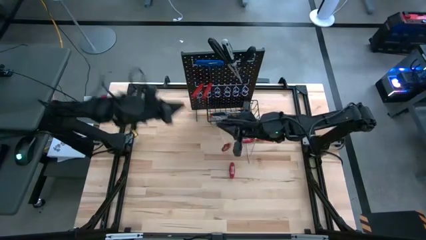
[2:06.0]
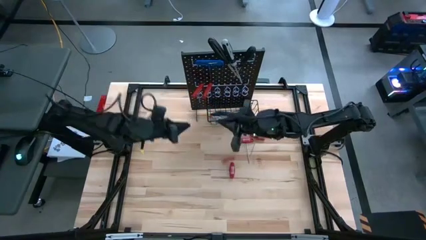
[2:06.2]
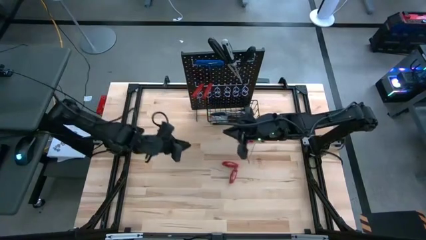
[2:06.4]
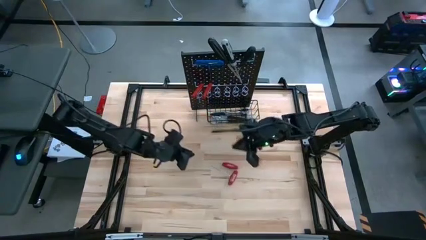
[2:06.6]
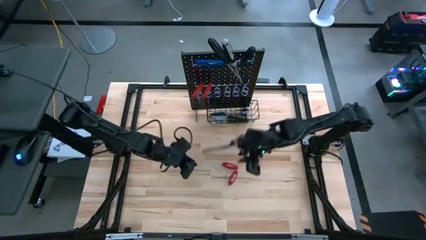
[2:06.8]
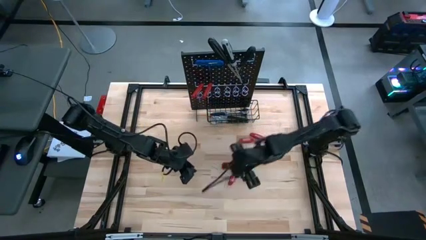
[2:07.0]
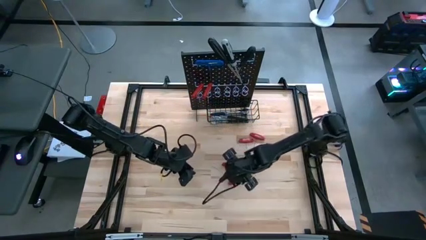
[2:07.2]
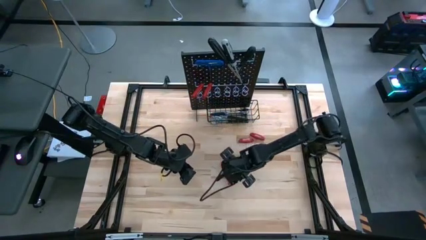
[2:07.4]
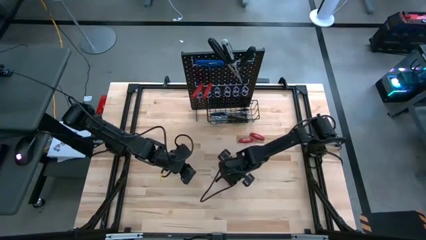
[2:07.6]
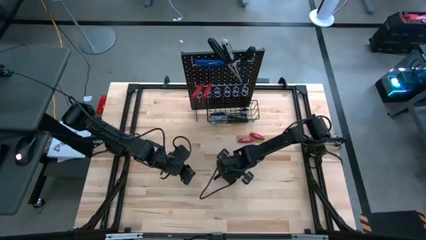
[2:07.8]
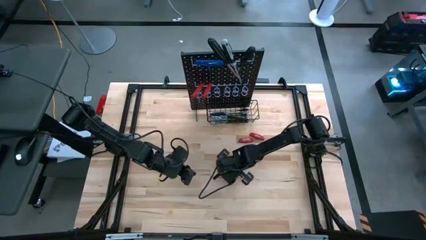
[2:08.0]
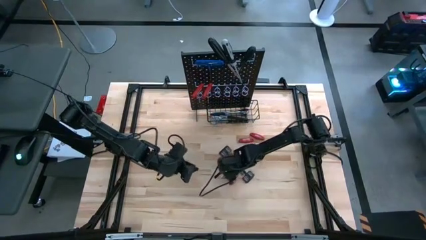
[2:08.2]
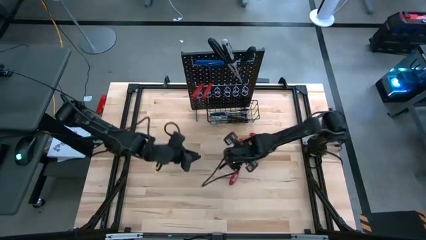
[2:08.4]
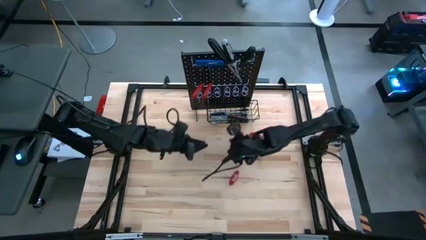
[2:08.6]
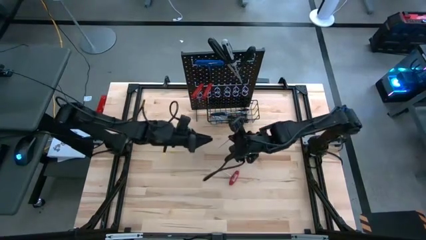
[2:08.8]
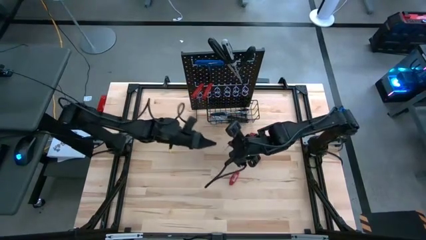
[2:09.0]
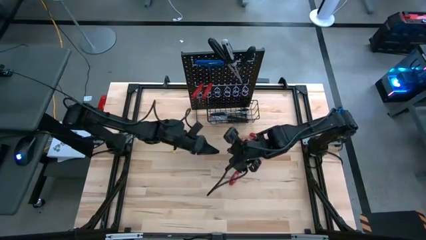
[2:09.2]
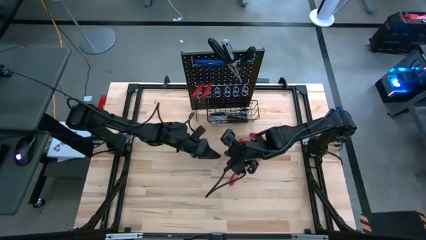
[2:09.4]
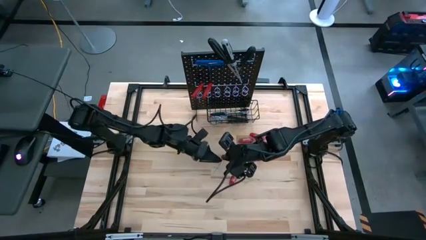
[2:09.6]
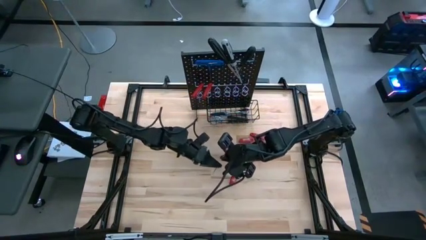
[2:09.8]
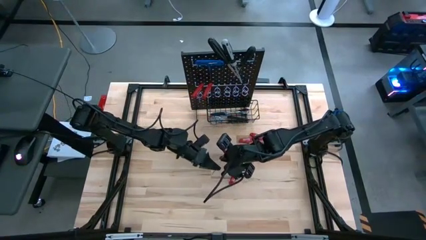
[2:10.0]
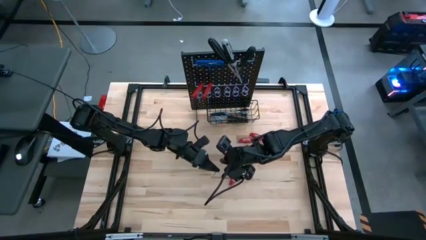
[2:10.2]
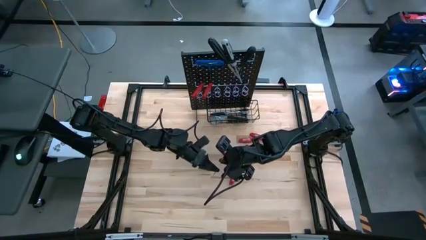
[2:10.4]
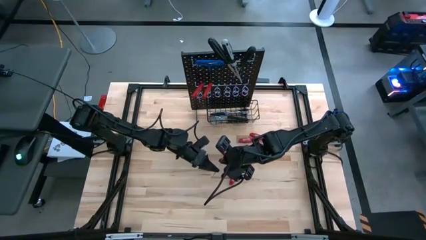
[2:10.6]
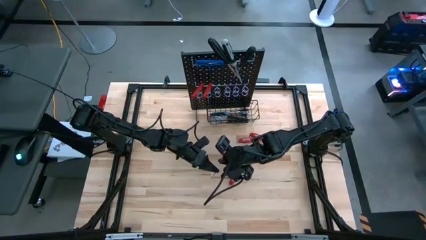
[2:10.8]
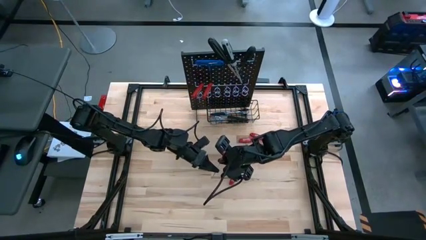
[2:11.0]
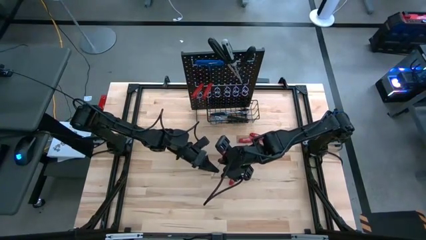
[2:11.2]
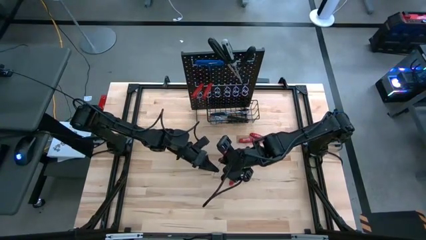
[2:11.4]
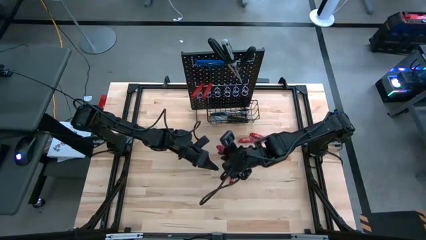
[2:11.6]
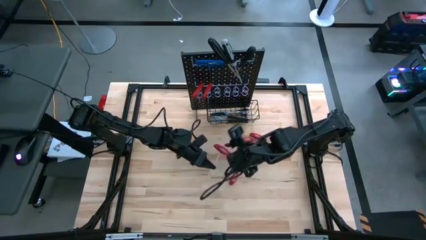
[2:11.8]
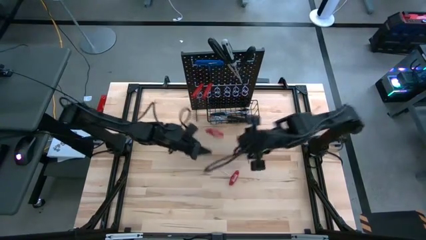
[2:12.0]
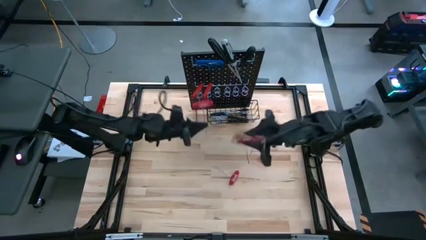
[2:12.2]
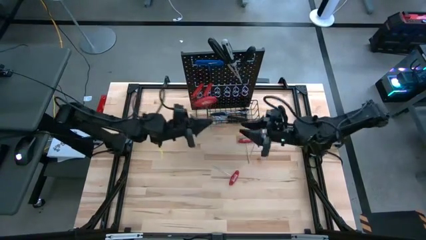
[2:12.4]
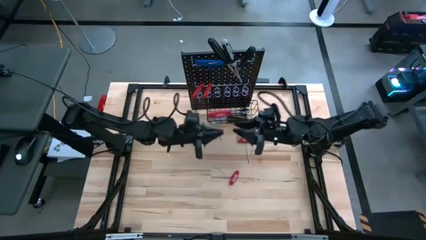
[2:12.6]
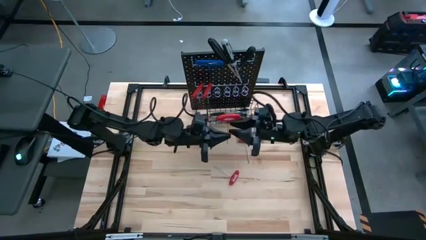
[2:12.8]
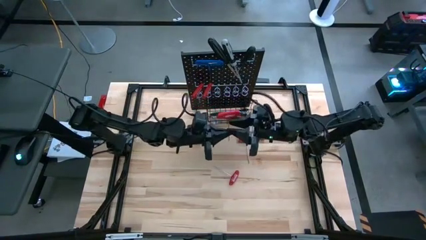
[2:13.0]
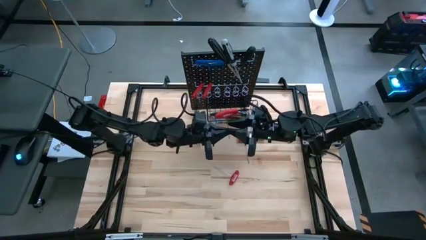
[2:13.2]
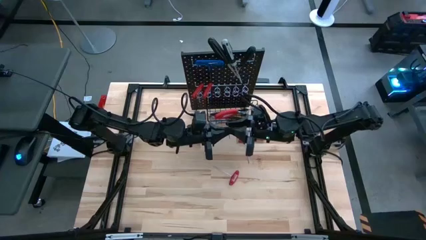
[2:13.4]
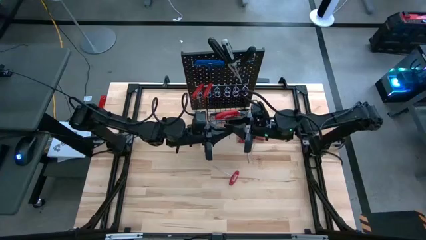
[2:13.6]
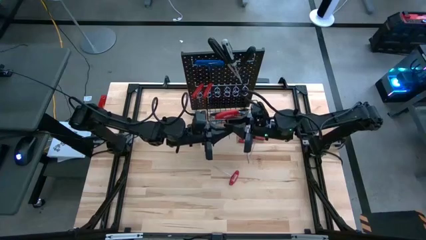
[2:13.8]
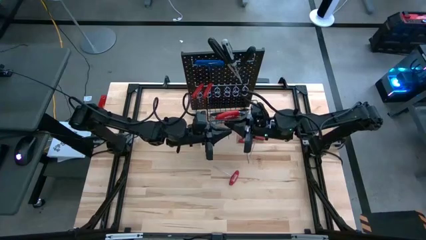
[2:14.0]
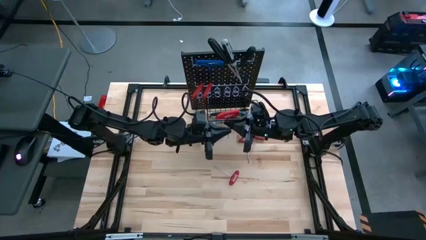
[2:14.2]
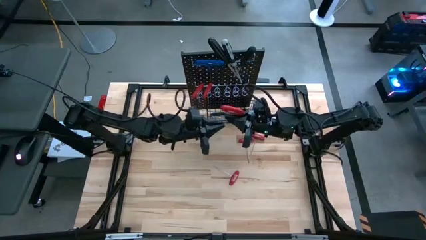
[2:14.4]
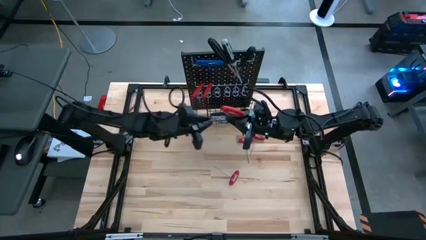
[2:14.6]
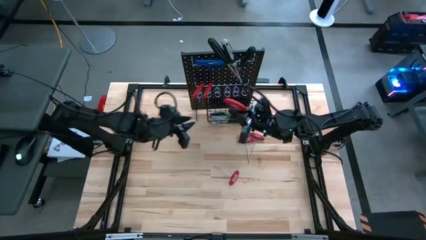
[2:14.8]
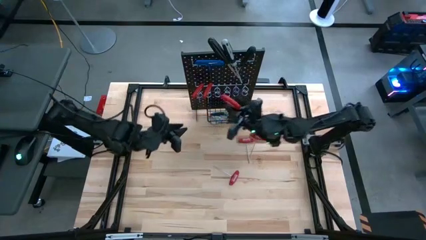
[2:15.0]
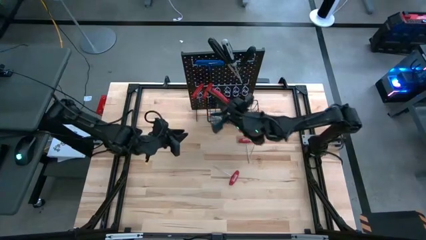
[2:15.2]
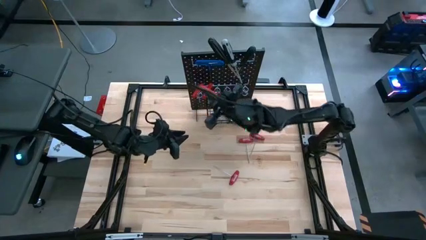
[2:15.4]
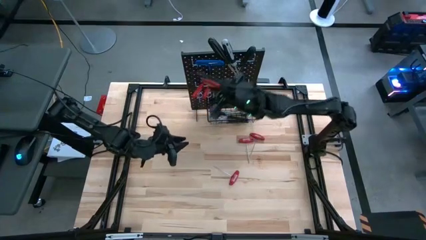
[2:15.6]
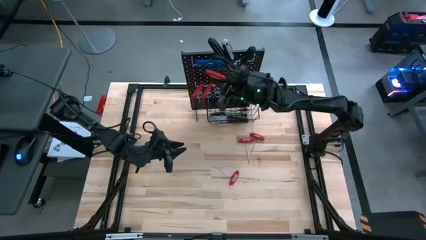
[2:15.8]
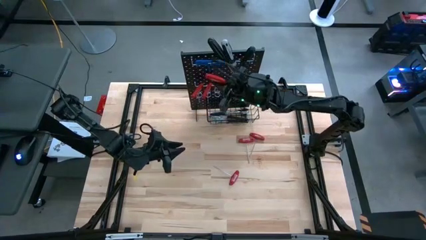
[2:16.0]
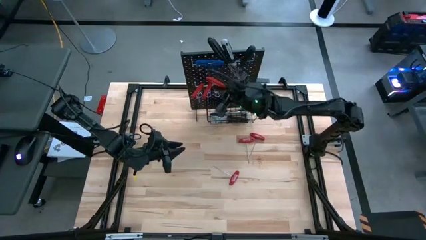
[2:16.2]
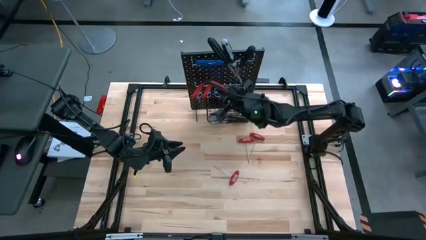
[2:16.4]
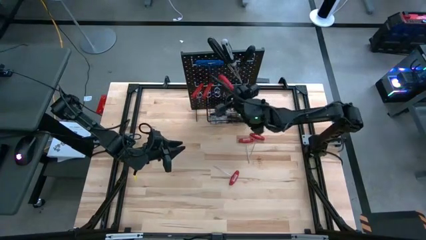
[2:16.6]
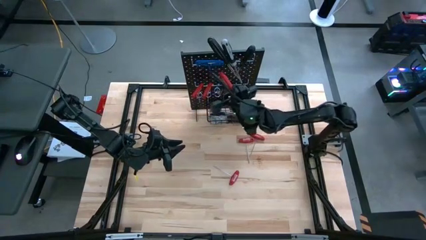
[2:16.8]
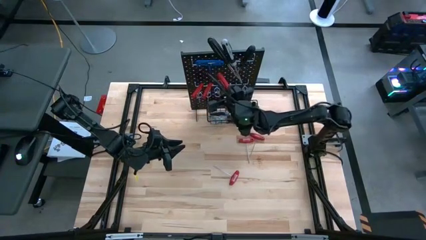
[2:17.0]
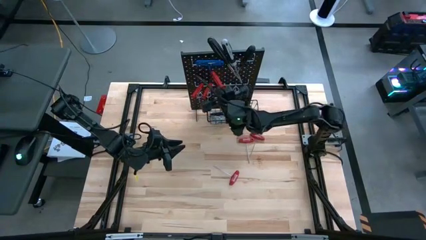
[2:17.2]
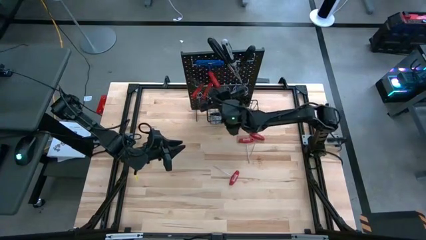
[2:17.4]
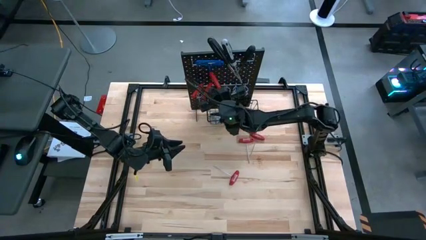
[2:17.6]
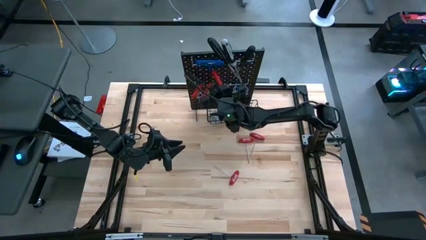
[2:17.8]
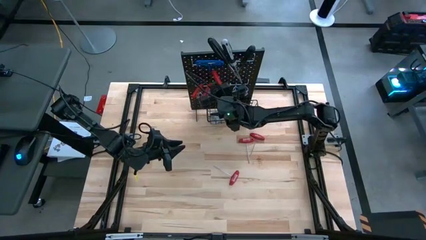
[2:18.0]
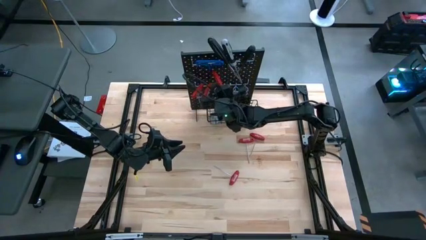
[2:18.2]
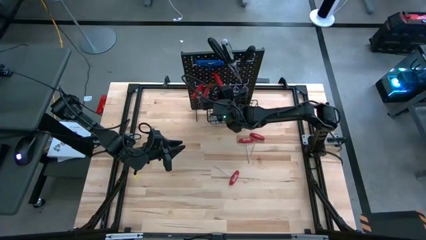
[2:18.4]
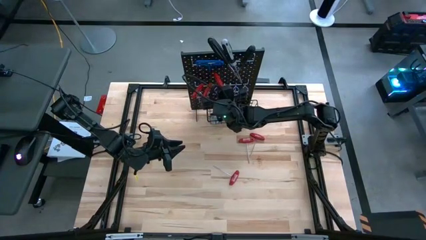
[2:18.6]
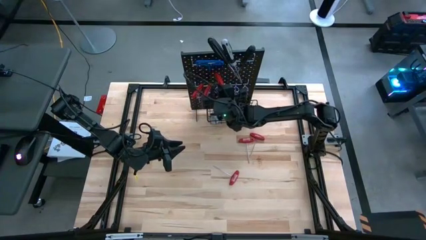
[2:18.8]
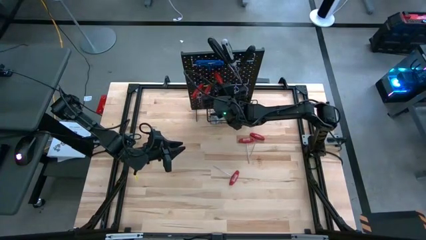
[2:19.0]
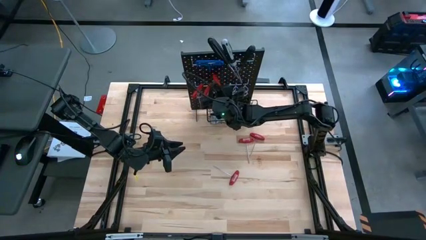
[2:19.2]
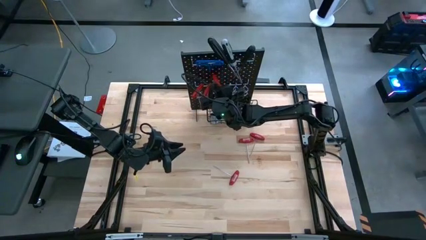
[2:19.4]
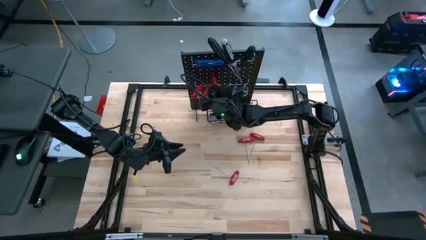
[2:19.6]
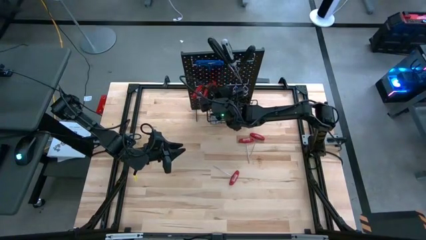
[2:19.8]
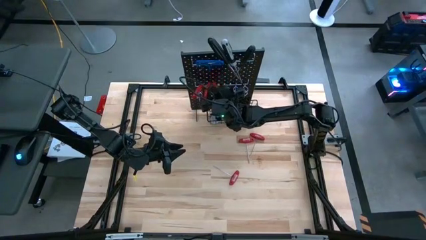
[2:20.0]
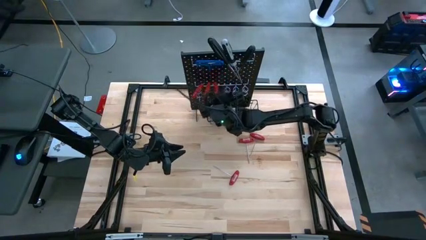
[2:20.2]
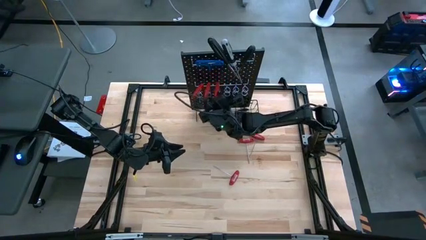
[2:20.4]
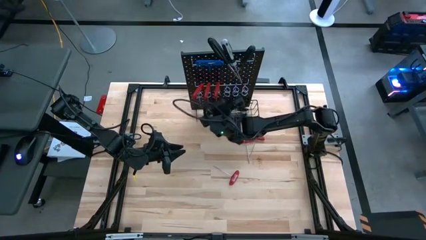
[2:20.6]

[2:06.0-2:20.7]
Task: Hang tools onto peg board
Hang the red allen wrench on the pegboard
